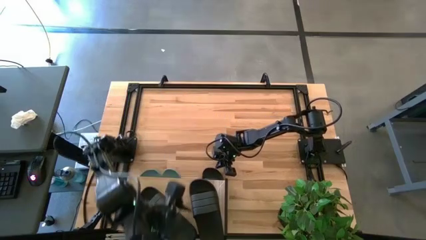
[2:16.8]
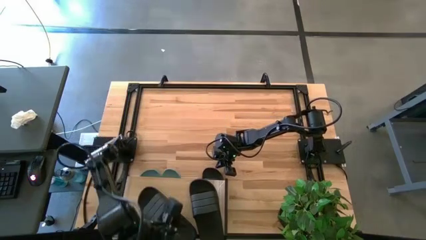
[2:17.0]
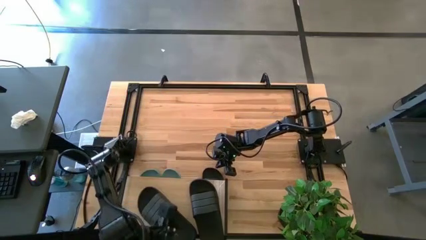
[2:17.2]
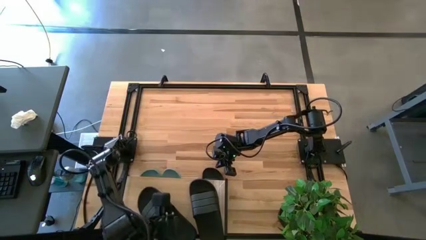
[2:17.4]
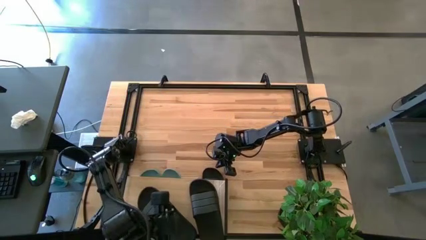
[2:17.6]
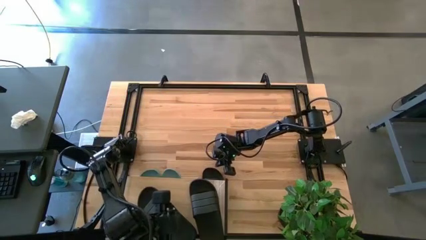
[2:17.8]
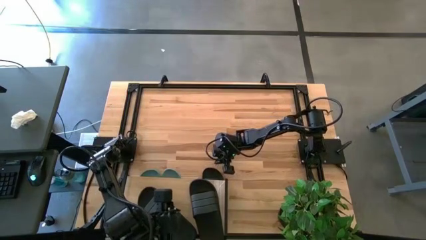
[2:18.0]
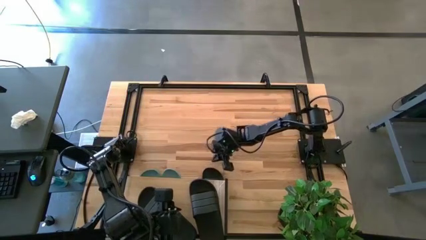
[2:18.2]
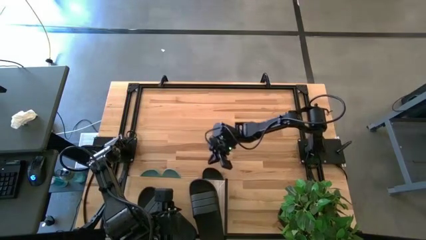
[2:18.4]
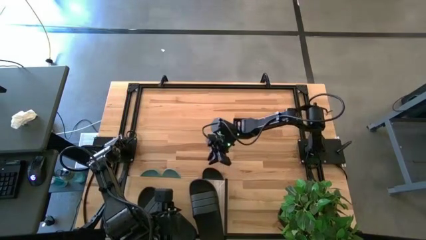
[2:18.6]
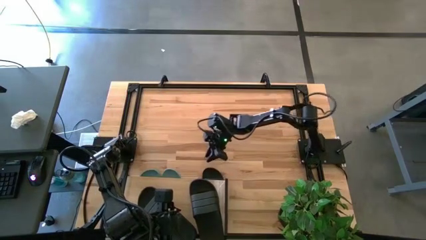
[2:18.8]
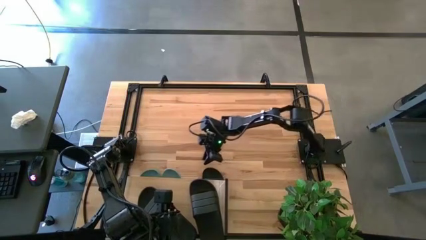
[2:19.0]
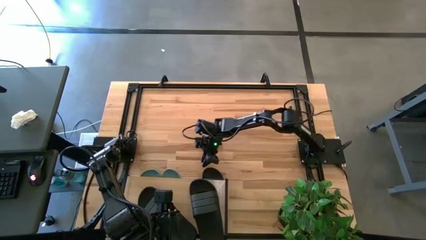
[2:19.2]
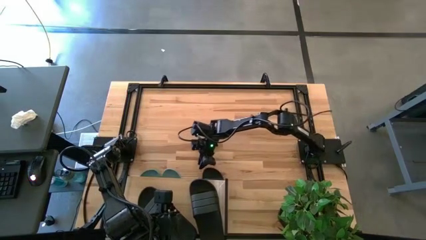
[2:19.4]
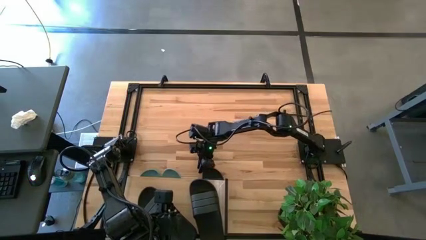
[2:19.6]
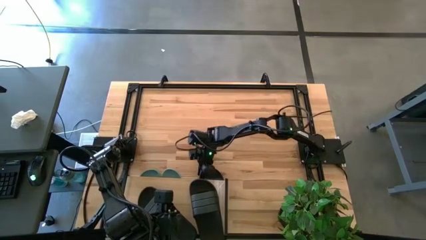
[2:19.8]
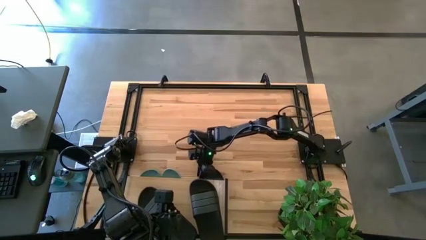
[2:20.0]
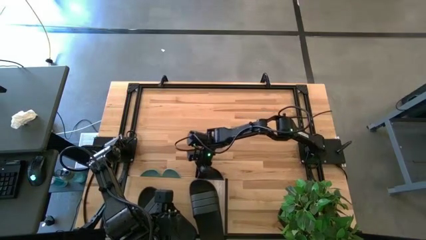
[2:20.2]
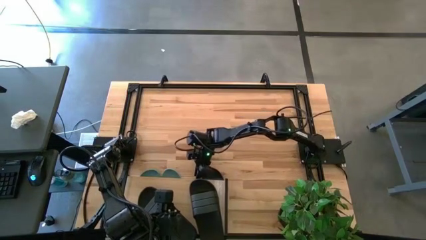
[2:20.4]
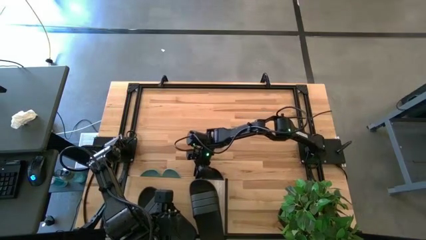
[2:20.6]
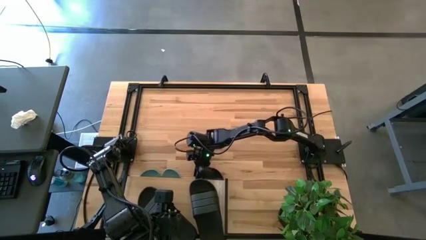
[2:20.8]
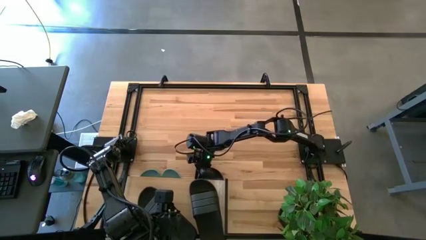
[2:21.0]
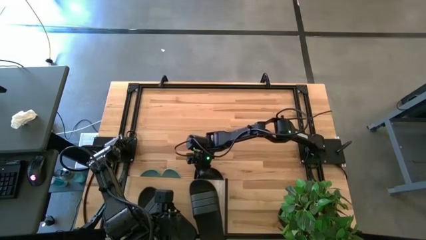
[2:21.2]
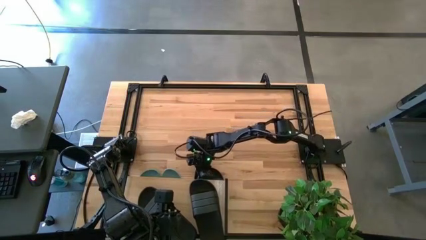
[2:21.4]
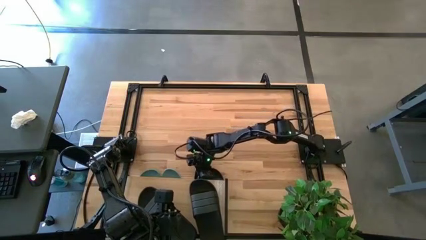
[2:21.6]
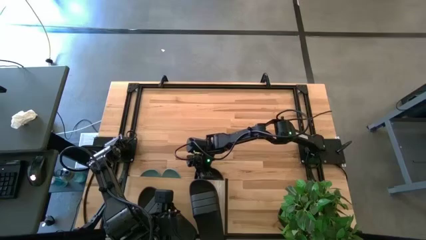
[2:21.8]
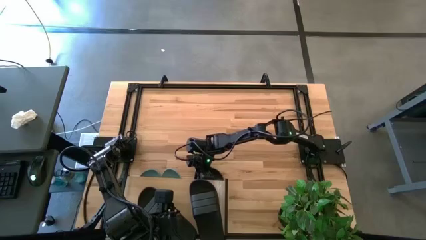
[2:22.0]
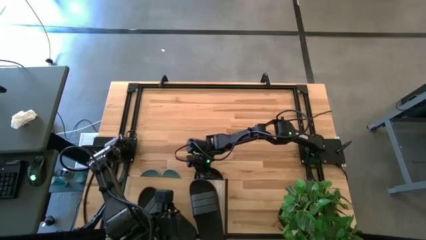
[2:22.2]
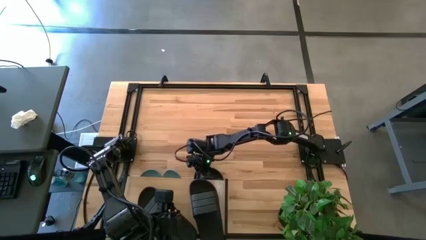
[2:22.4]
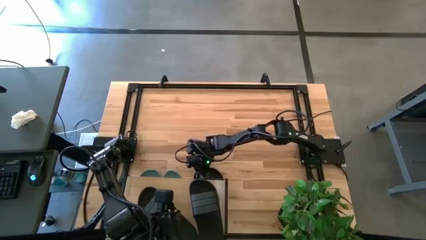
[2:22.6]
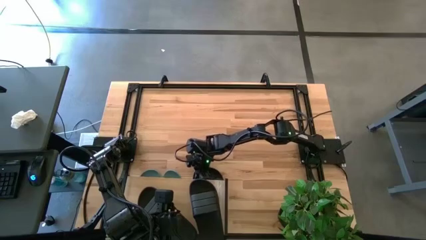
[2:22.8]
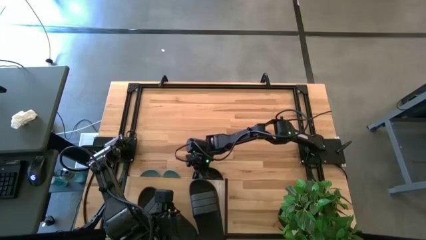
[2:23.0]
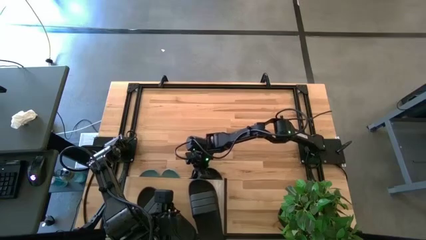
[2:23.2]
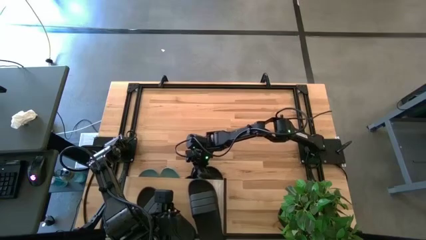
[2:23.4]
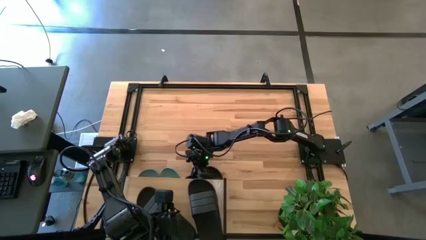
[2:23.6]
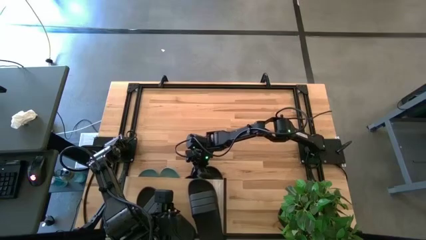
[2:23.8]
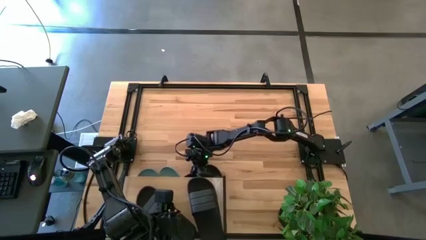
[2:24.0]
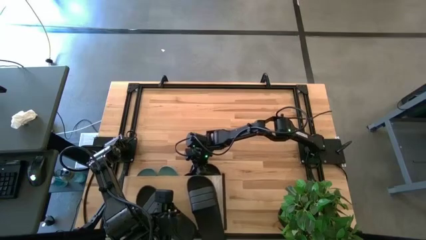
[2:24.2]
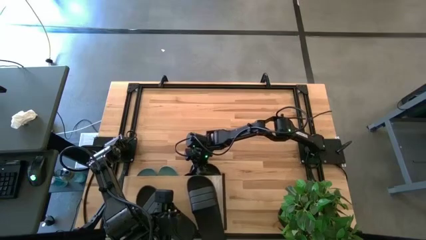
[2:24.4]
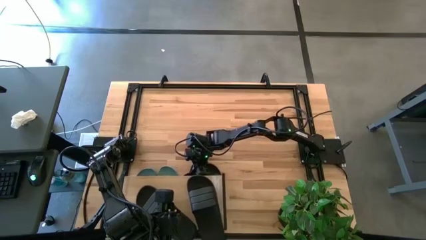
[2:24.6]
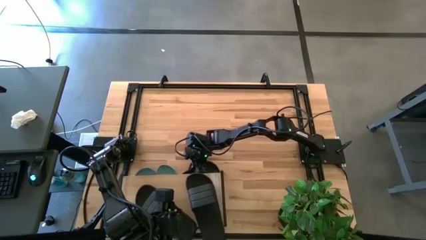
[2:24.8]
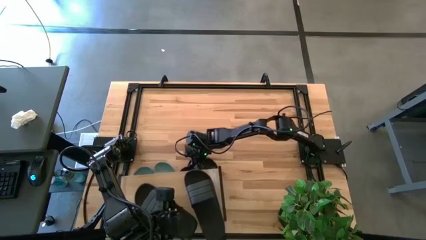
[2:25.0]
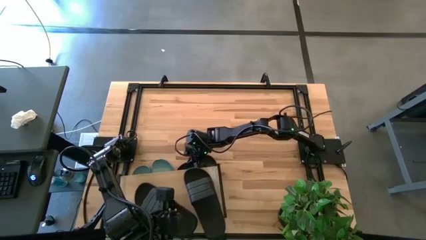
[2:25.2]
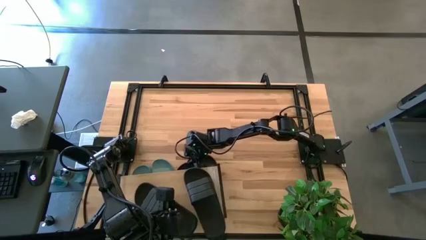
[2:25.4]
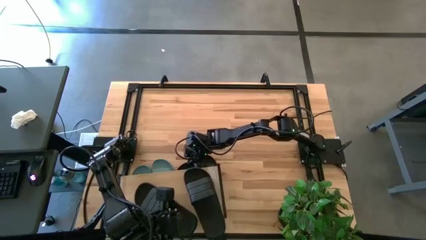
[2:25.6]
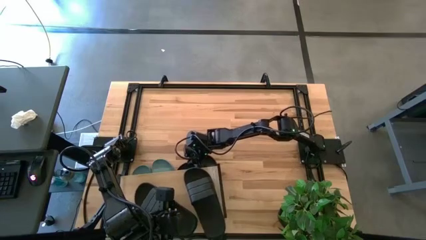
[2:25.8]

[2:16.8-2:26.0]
Task: Pick and place slides into the shelf
Adjust the black slipper under the shelf

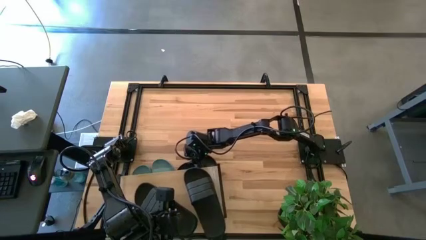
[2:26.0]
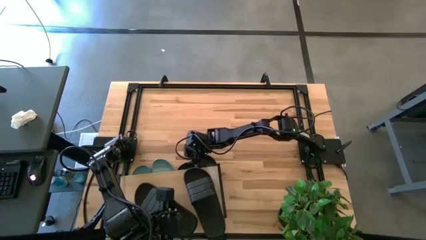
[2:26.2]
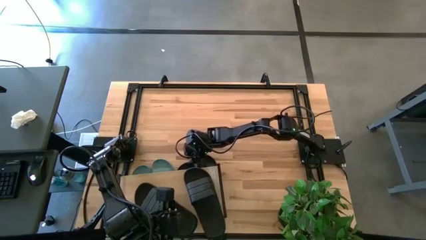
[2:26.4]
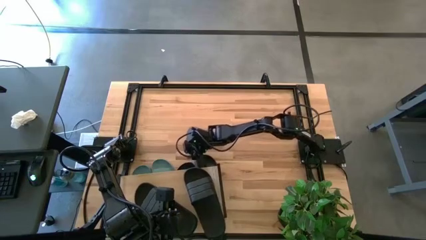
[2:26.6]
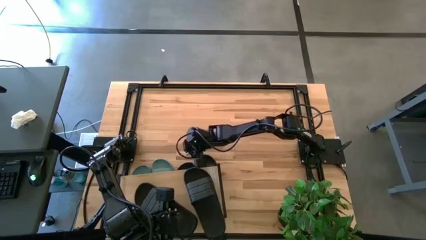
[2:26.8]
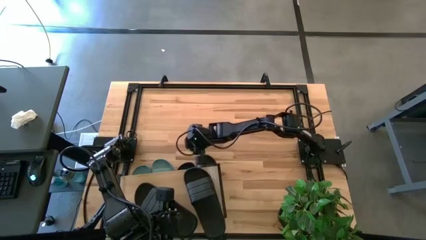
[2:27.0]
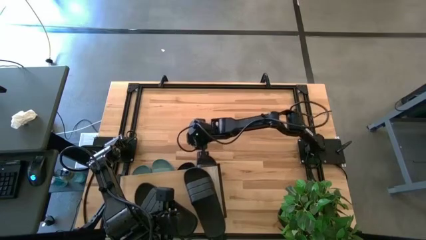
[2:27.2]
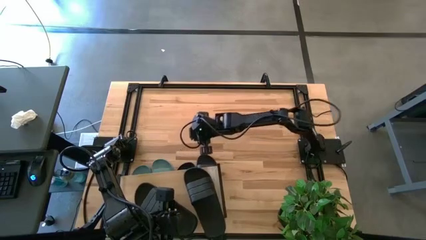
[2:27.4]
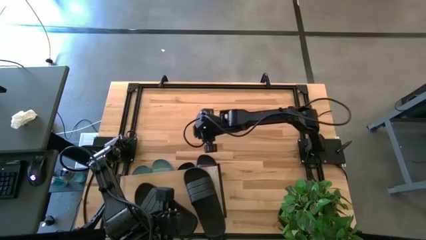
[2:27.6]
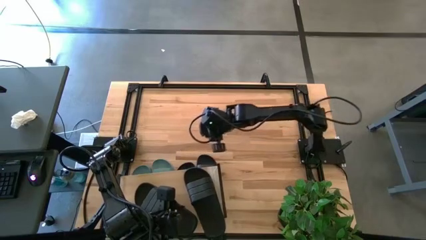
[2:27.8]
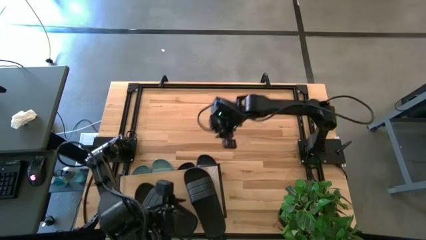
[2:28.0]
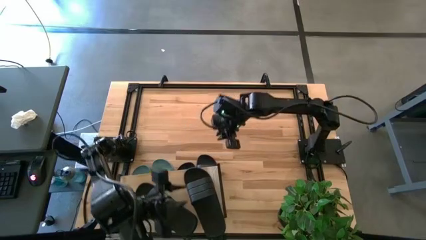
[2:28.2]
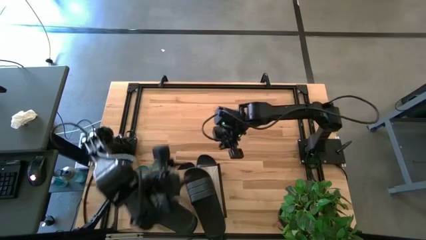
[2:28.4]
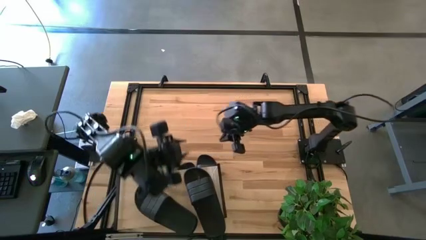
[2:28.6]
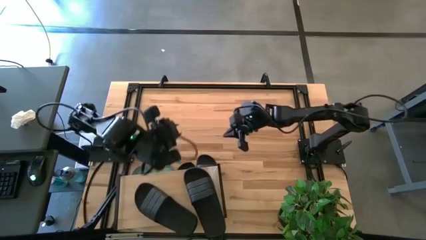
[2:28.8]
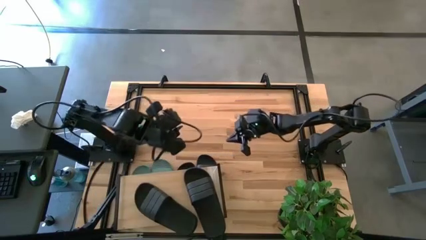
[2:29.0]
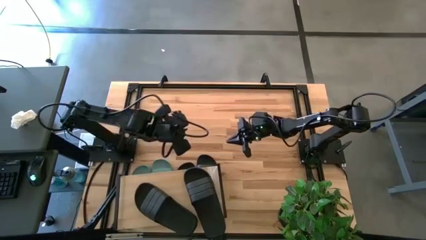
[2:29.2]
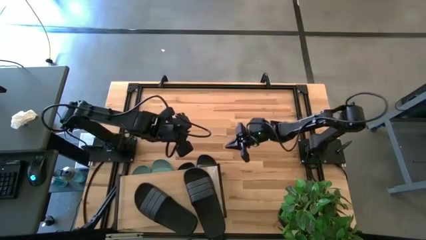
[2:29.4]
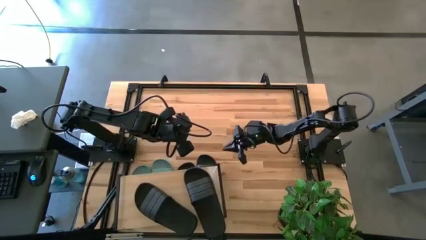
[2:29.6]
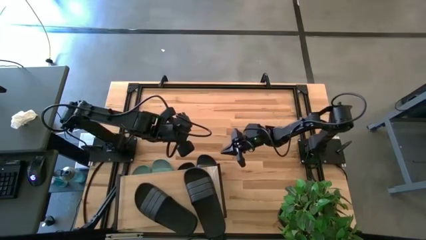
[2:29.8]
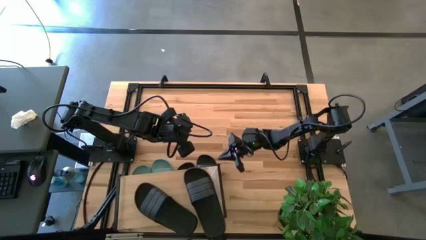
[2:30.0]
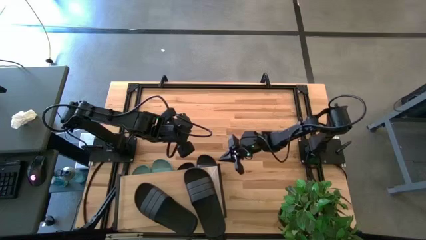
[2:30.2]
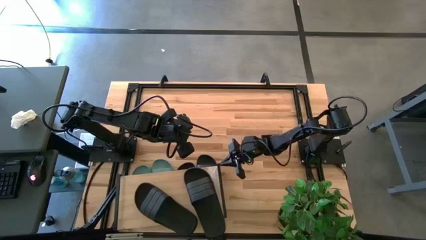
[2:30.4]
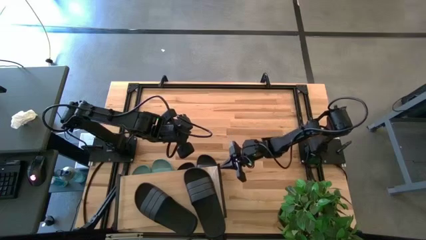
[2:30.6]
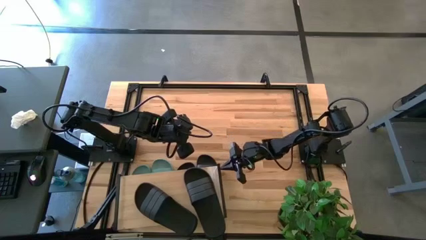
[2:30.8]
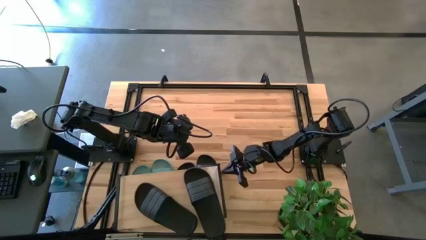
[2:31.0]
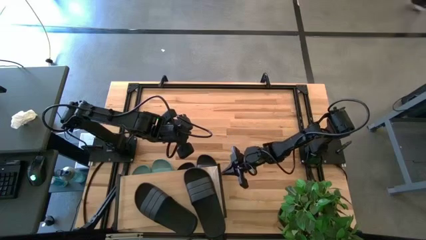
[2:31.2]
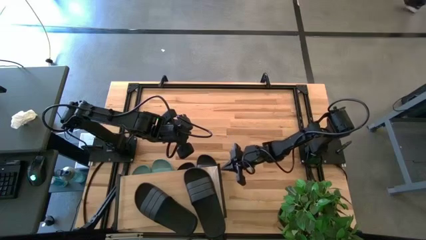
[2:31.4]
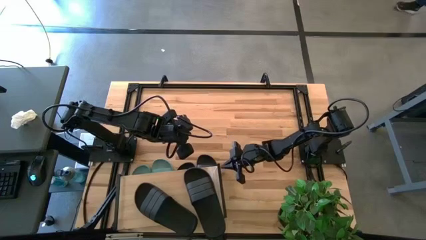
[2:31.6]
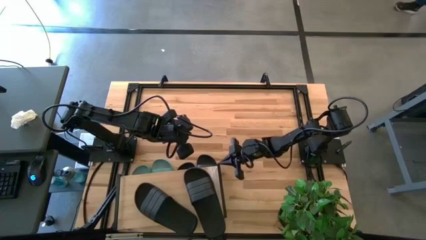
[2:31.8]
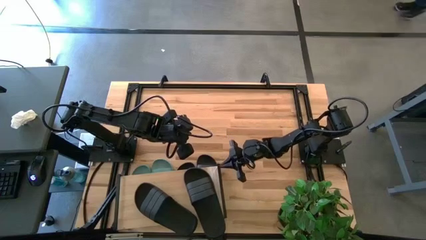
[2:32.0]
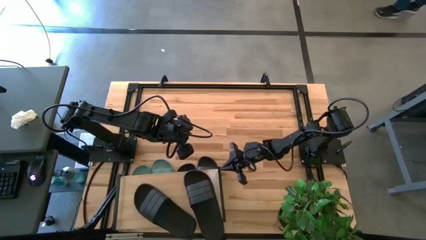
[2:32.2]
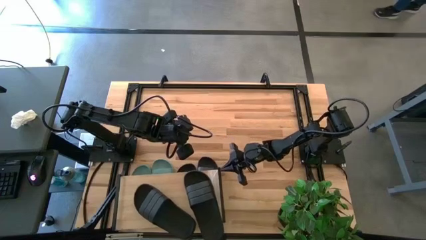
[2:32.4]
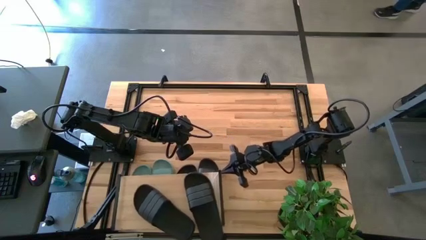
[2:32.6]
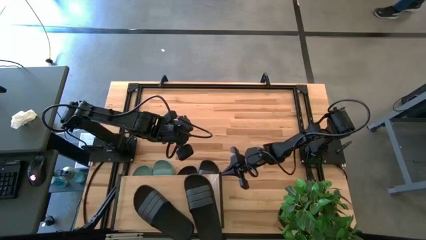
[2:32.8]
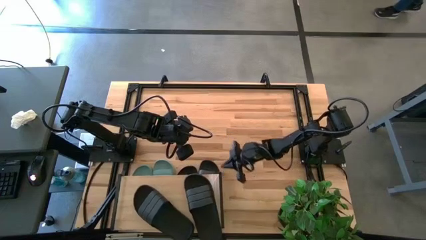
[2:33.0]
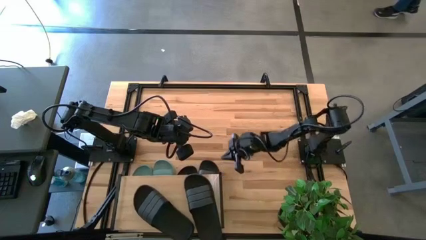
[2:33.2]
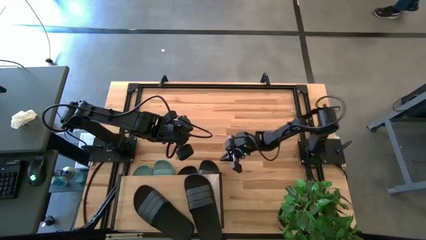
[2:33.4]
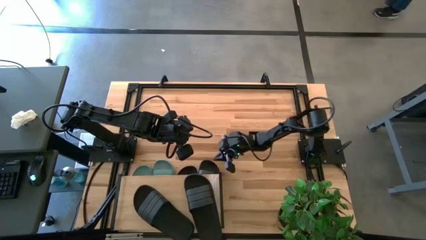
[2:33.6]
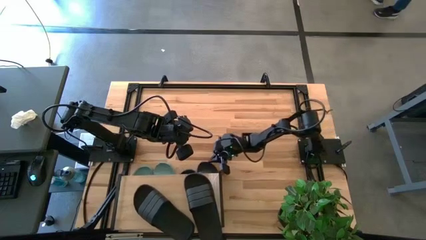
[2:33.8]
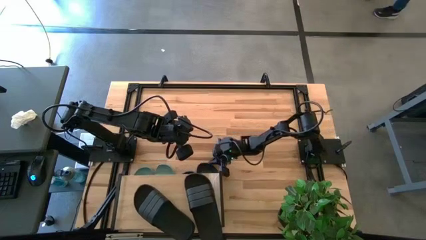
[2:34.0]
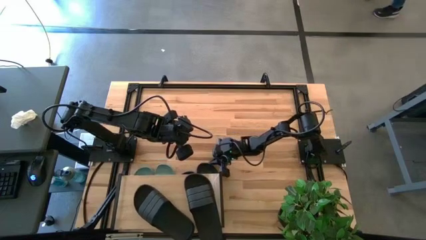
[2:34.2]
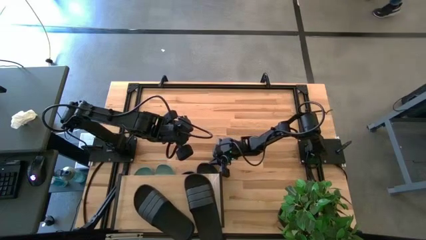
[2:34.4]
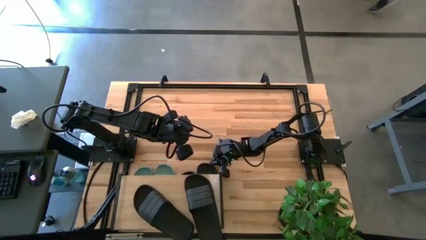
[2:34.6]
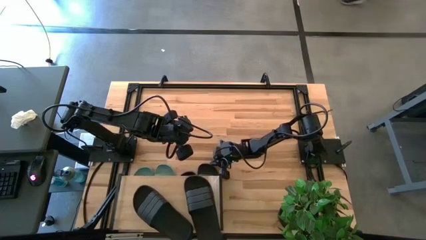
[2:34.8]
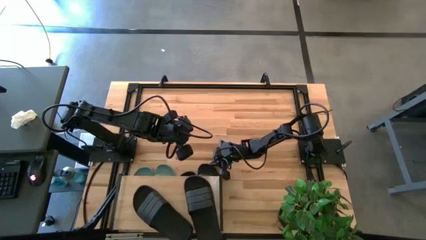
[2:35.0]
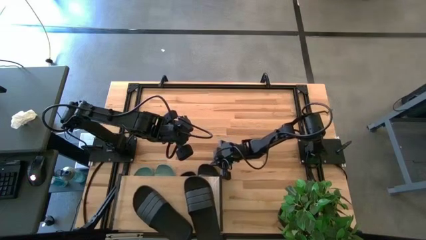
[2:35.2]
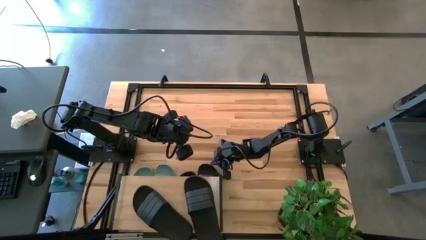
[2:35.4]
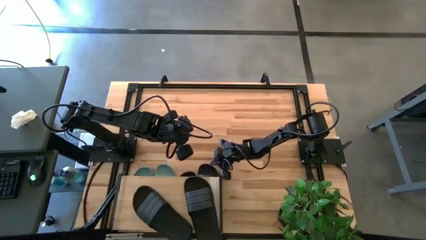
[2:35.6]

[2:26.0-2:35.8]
Adjust the shelf
